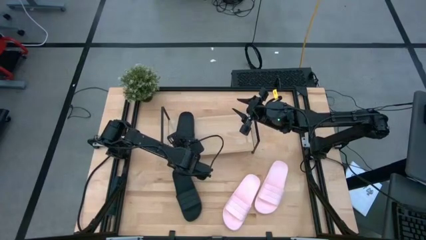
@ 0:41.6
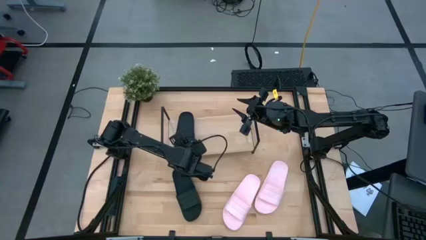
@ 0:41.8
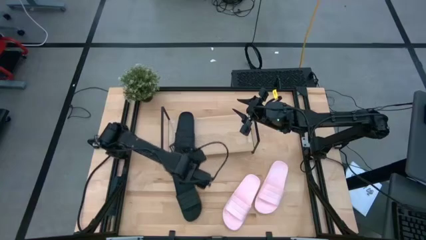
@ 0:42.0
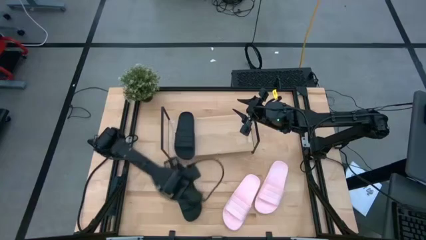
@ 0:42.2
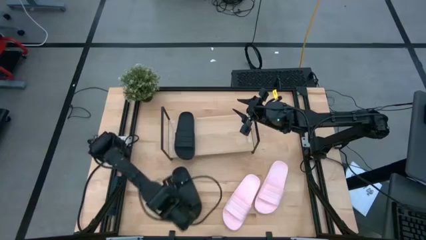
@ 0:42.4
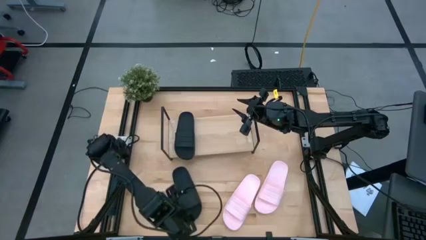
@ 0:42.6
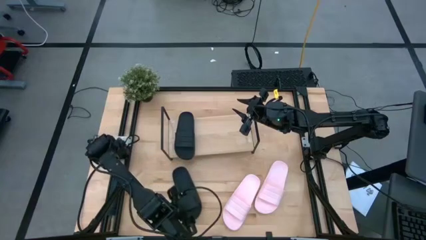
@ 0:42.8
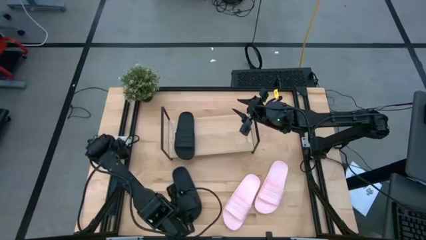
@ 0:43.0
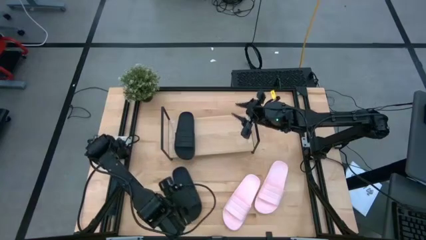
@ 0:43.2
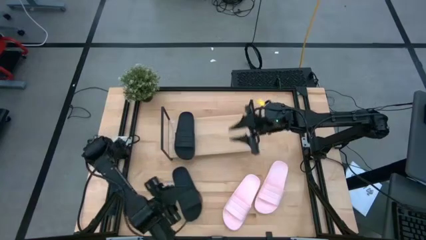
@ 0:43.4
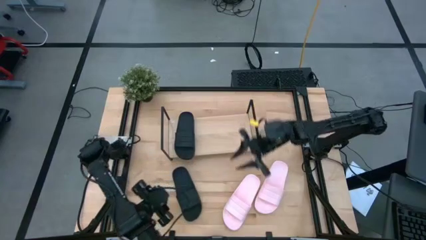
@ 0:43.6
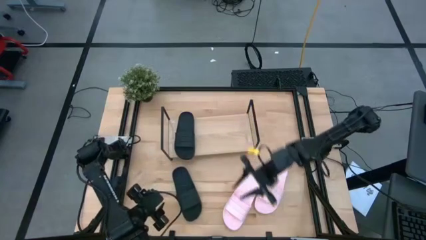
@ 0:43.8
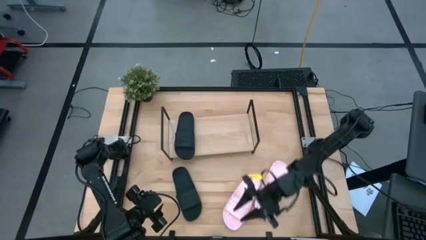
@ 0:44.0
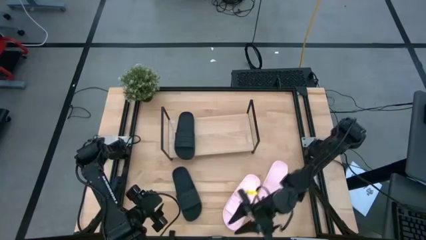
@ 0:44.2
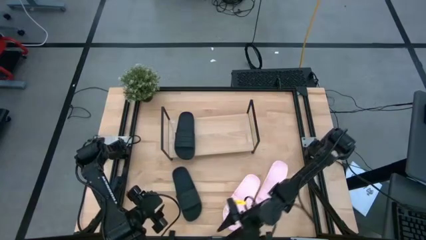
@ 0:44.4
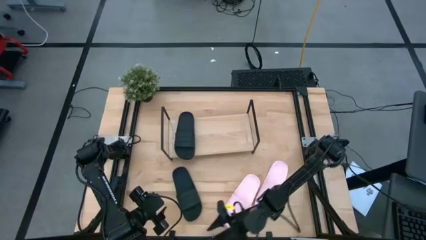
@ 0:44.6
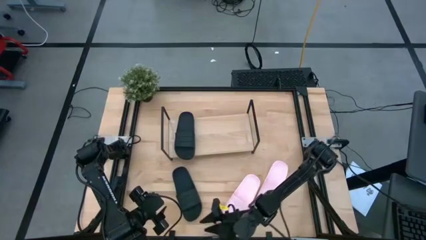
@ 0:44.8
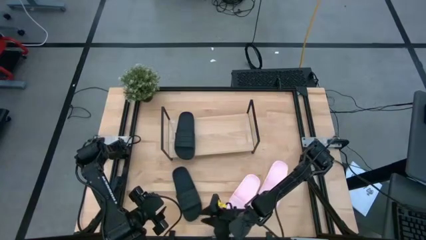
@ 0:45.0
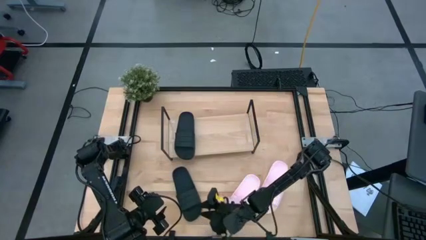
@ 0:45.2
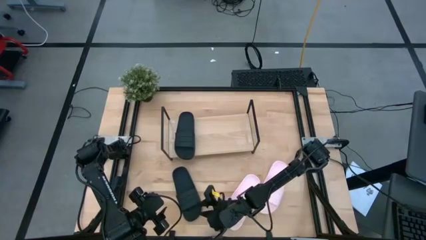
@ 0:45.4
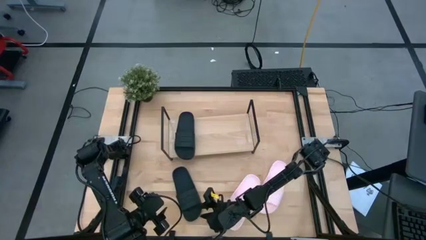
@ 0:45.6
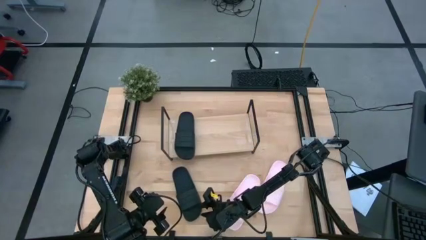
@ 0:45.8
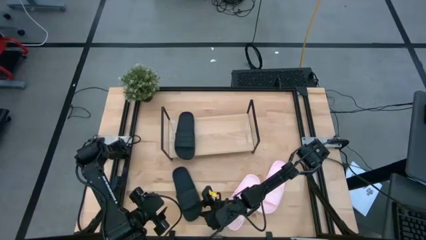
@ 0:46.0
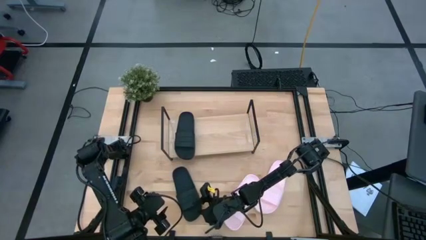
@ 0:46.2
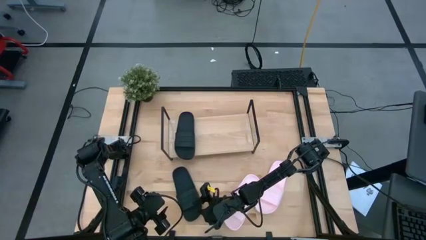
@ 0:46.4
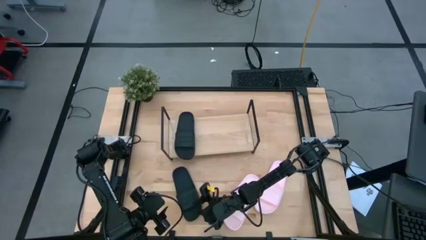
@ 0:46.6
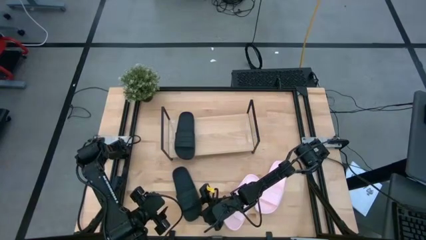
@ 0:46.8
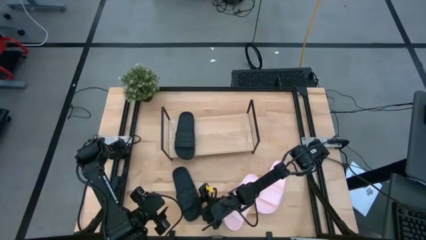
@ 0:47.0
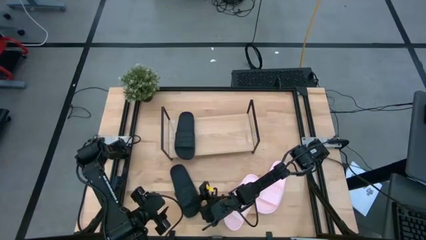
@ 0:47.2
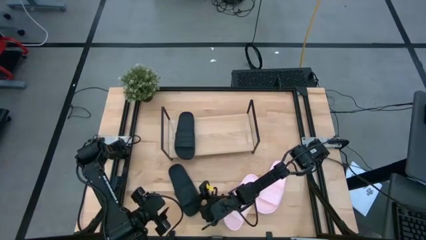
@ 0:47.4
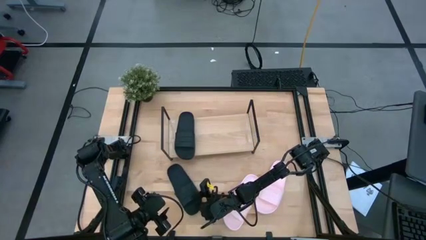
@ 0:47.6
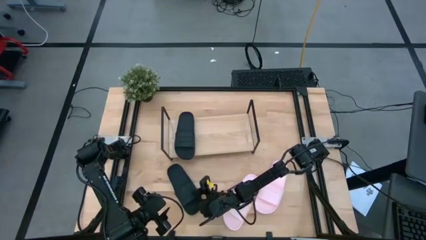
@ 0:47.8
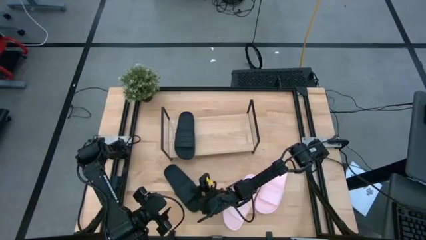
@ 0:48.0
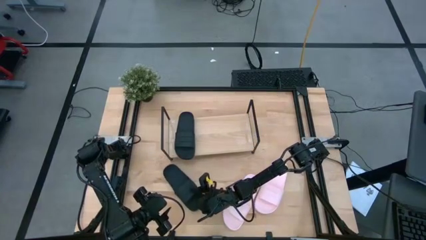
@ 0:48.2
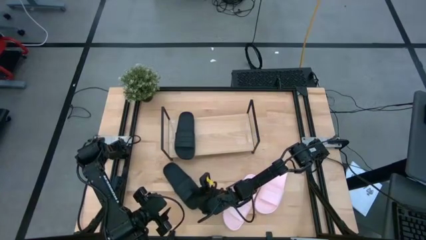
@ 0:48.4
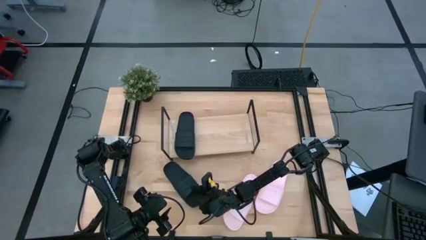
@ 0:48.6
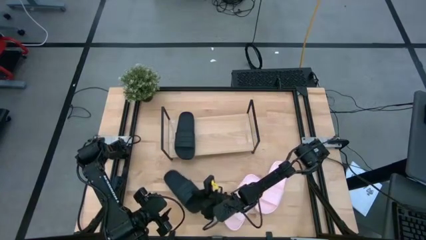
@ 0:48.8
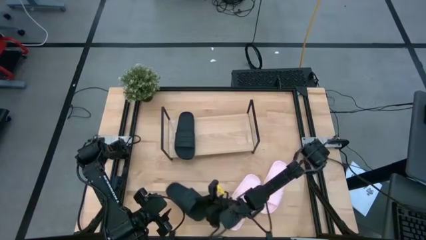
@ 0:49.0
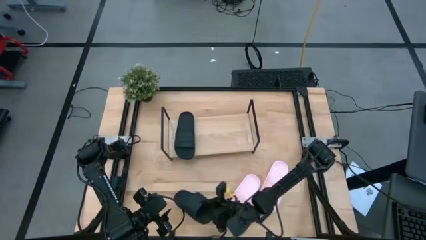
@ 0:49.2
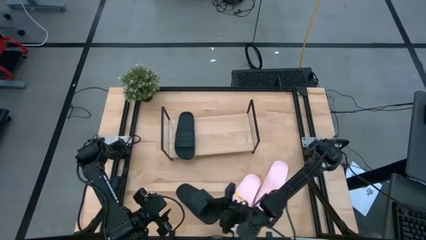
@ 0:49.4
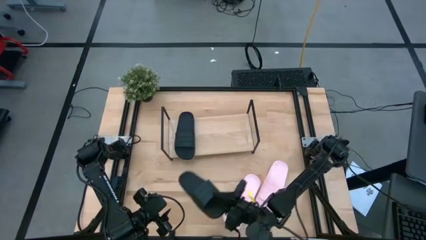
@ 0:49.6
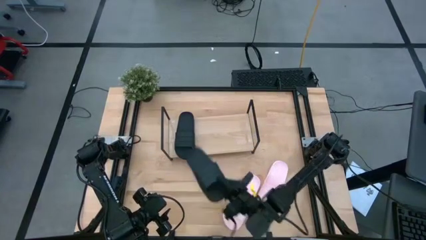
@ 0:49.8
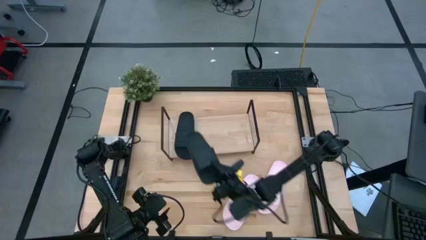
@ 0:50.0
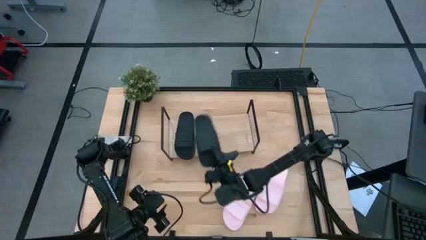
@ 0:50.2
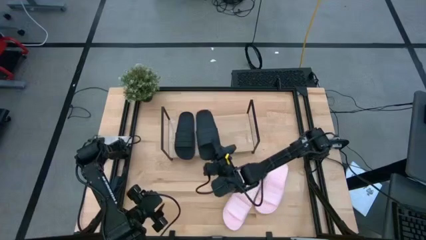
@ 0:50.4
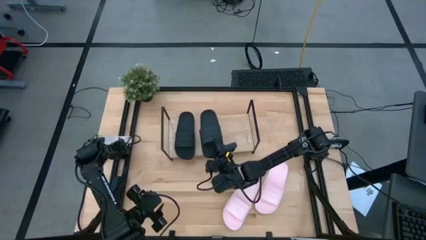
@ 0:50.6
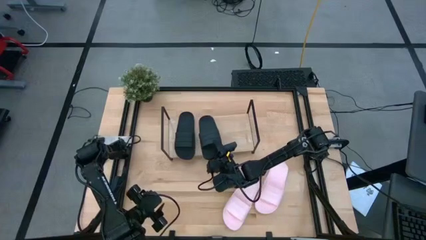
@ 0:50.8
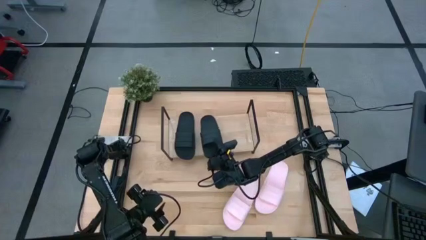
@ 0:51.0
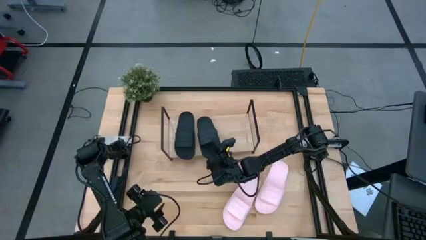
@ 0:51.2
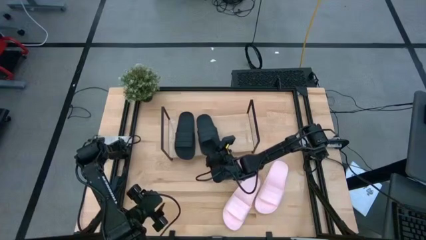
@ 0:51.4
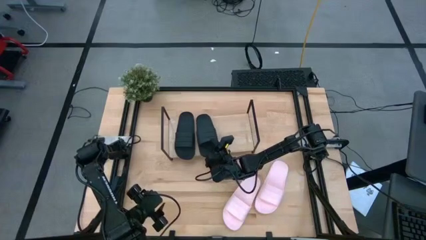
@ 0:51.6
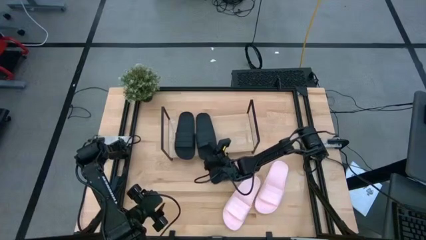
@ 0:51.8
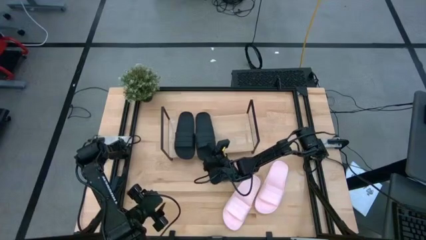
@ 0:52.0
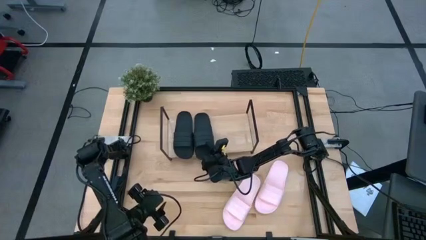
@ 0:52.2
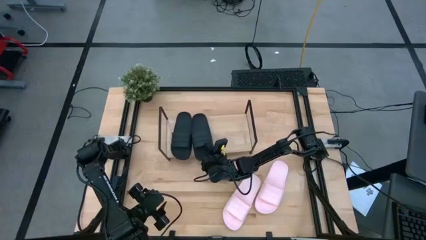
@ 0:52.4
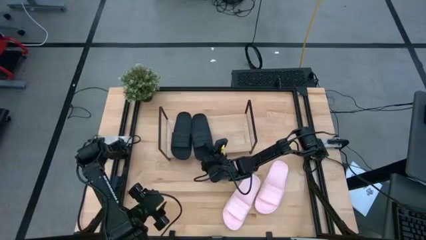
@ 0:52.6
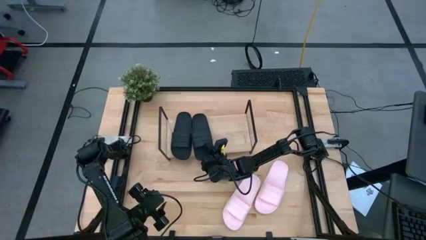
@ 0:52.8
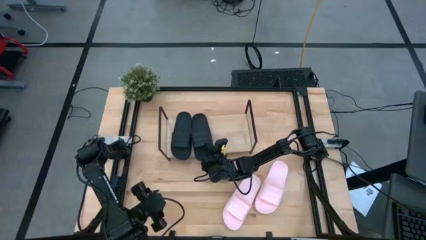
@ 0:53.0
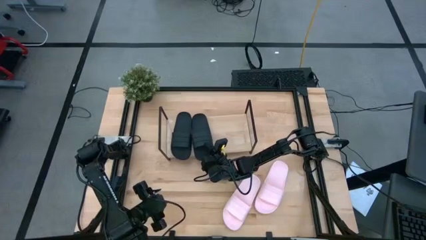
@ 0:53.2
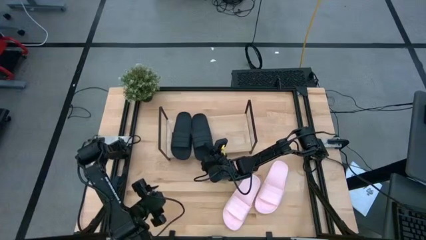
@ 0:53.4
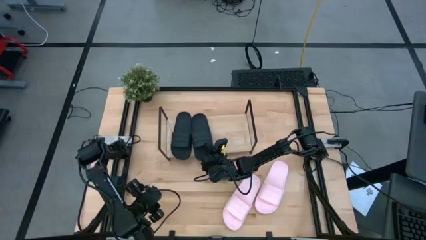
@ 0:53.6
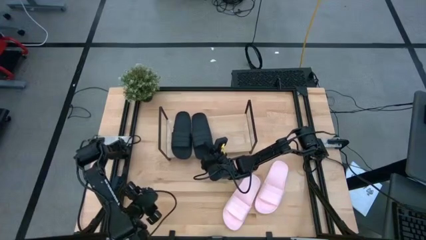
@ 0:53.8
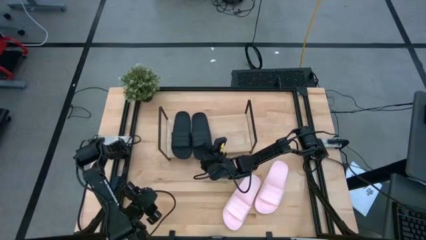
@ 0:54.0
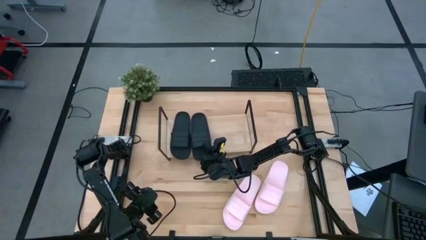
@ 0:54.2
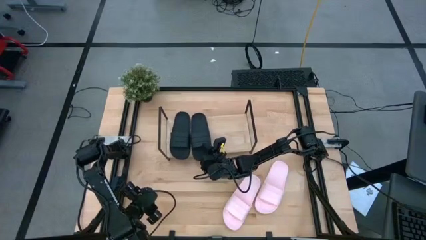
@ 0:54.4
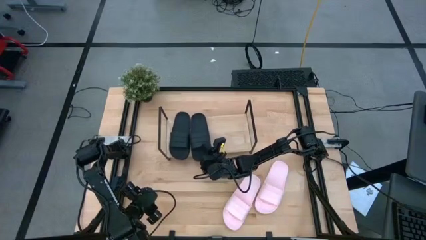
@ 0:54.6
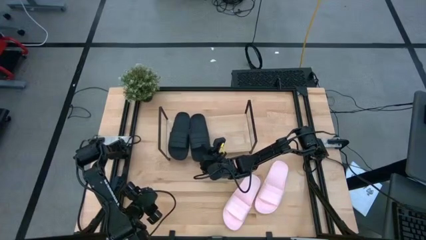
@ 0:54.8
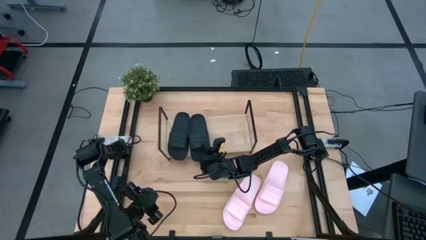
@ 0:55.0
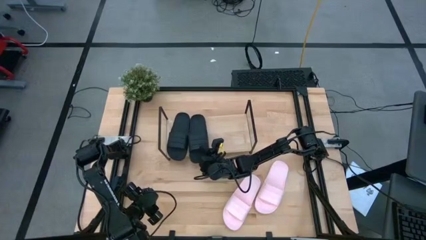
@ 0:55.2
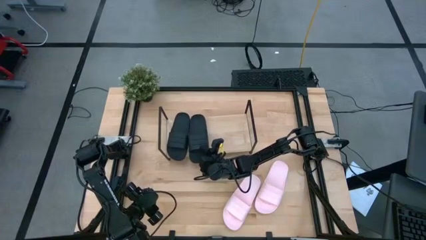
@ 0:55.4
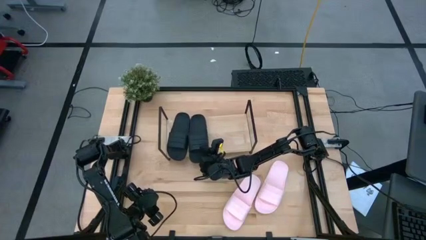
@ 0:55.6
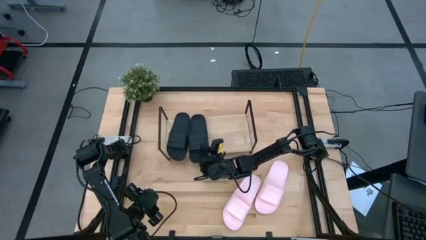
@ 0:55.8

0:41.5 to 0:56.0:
Task: Pick and place slides into the shelf
Put the black pair of slide on the shelf
